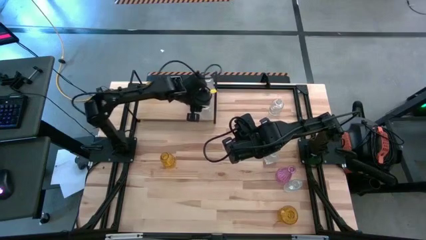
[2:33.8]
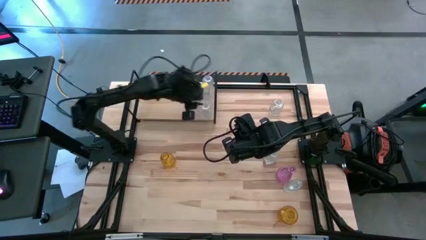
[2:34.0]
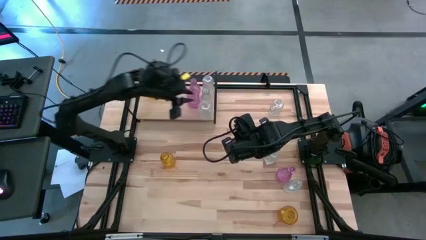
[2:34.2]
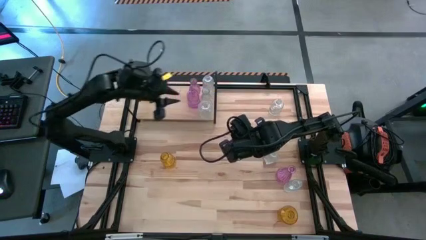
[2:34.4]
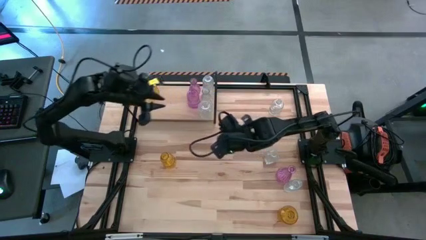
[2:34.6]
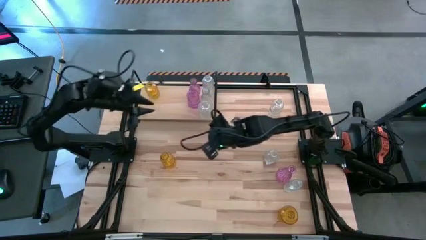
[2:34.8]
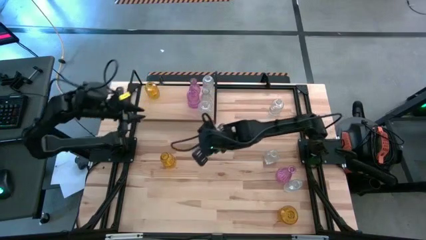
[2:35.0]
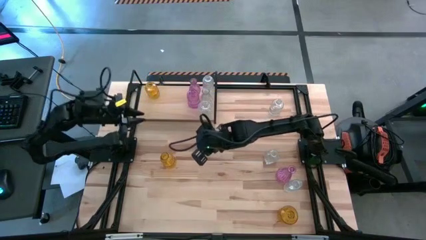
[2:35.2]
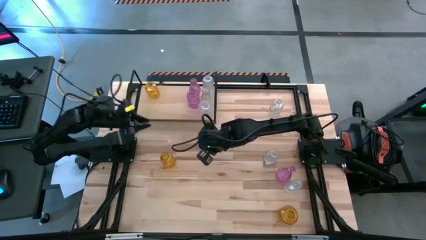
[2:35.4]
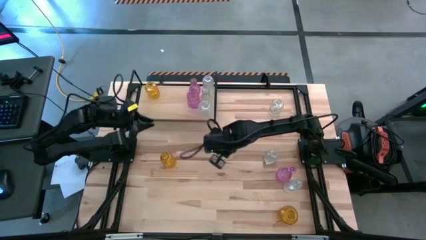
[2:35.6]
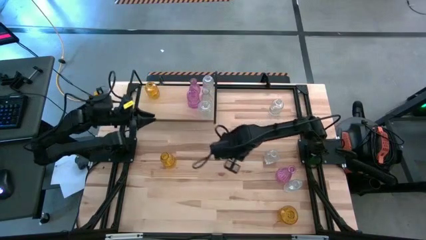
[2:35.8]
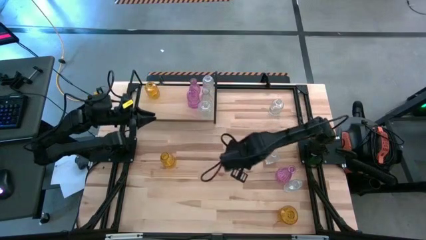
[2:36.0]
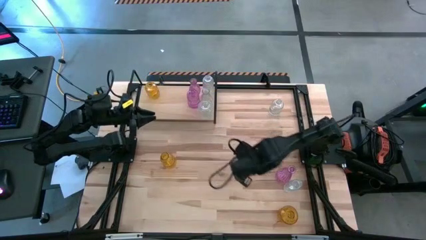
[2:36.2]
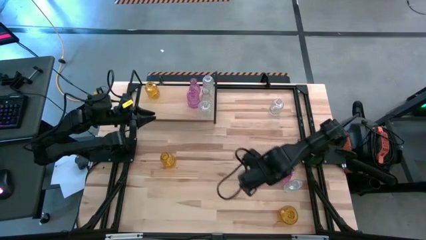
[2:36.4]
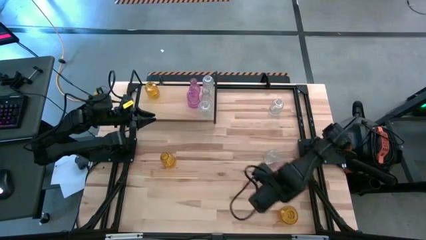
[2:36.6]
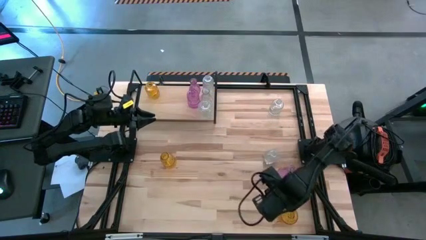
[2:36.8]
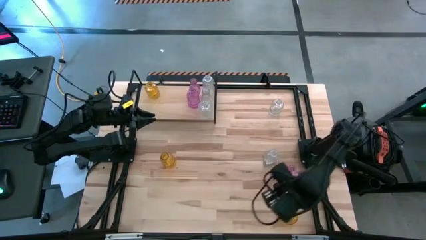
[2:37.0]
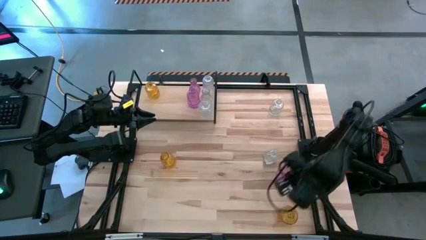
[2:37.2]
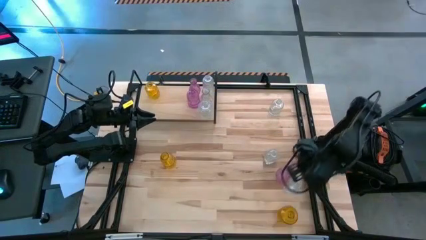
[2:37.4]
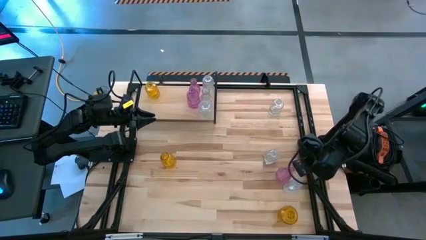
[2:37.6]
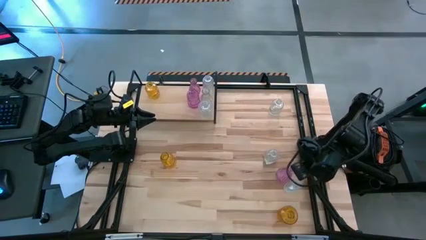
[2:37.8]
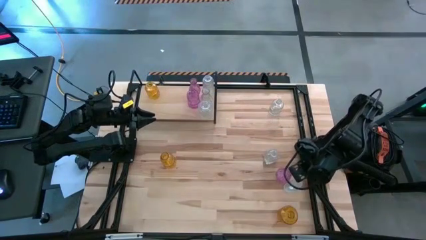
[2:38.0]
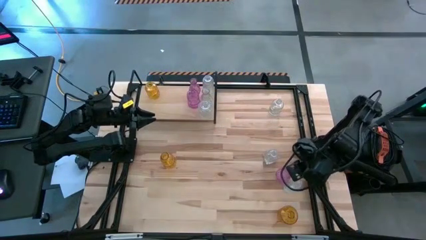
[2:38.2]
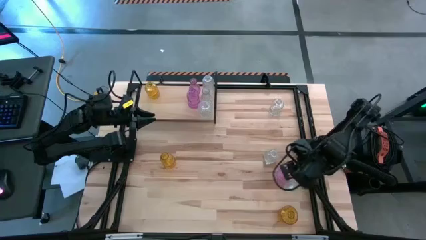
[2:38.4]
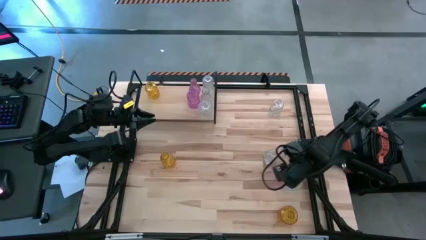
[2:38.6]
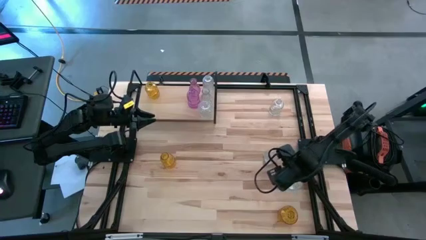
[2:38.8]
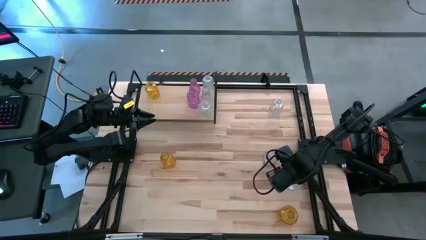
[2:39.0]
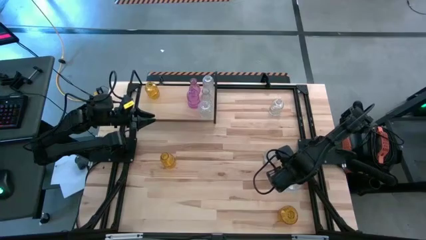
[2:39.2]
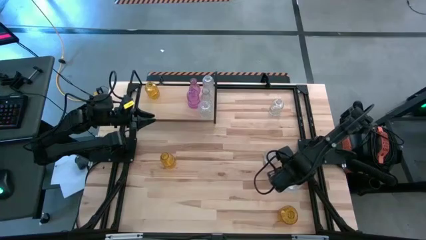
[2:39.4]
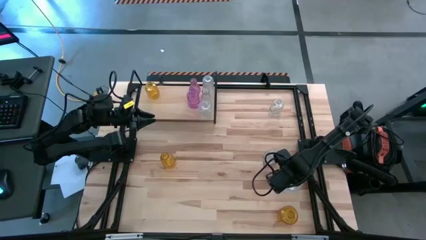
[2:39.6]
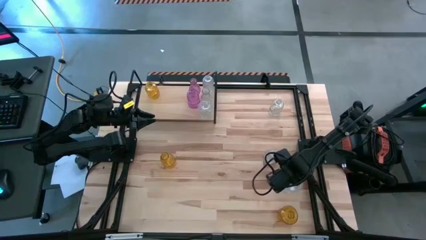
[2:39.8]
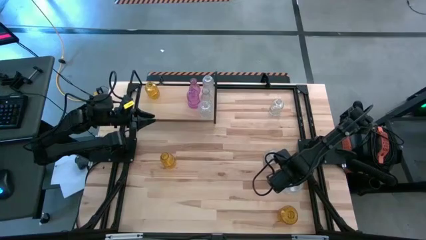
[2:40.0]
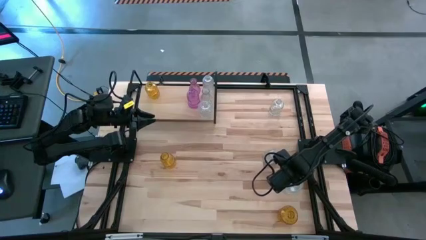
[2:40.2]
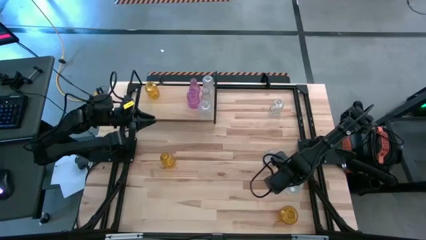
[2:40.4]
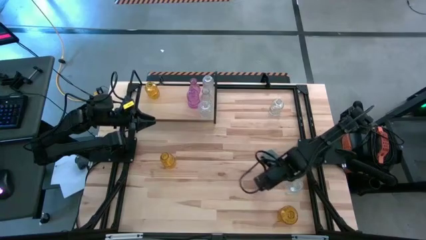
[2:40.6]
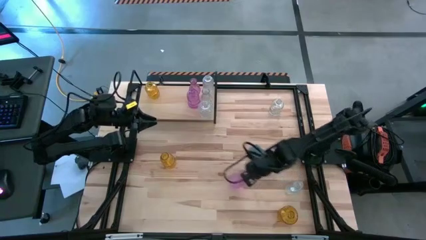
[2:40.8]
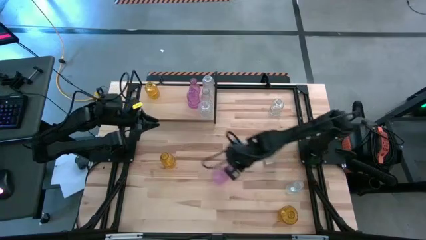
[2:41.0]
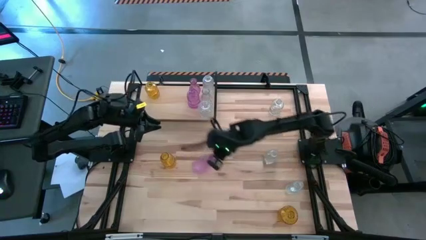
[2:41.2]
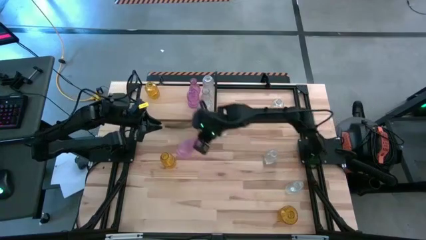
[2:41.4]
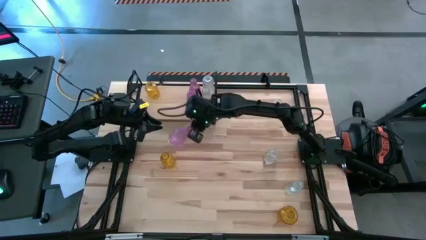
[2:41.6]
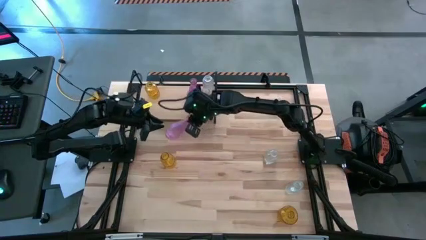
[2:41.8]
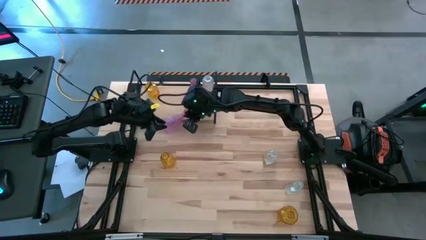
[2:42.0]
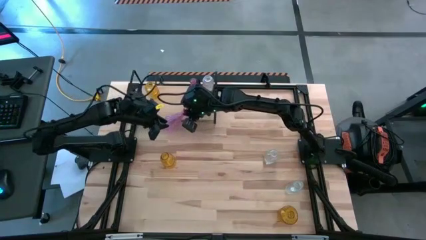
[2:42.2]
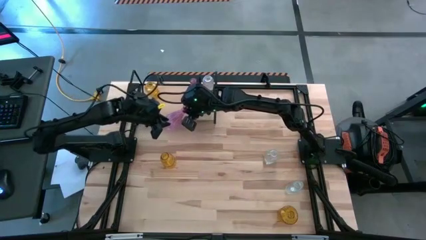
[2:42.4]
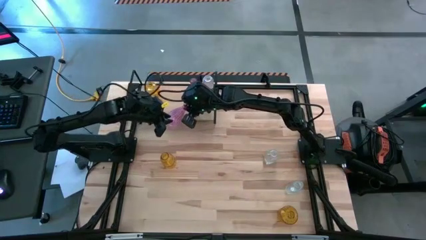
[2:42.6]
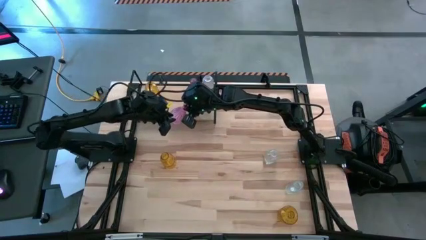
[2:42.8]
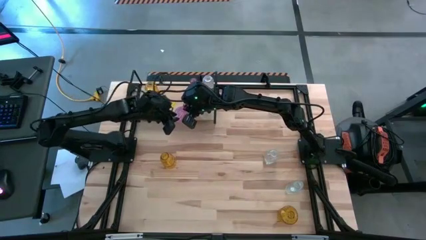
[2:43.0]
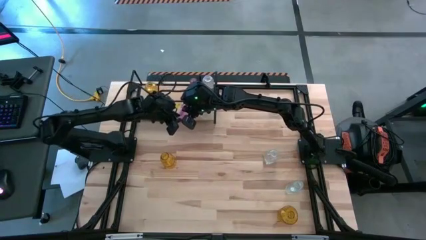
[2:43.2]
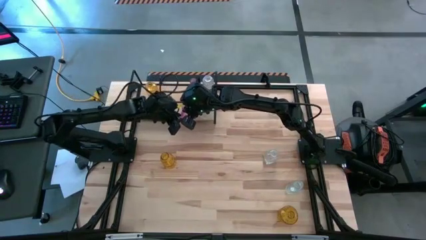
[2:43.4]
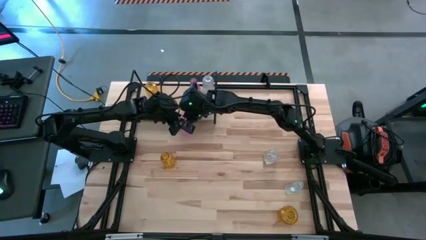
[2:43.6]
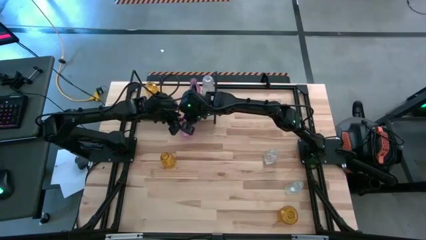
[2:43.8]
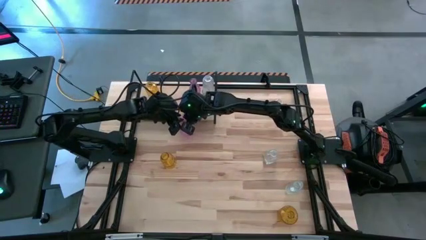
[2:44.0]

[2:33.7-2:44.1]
Task: sort vases onto shelf
Put the pink vase on the shelf aligned with the other pink vases

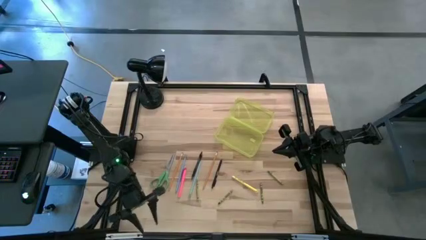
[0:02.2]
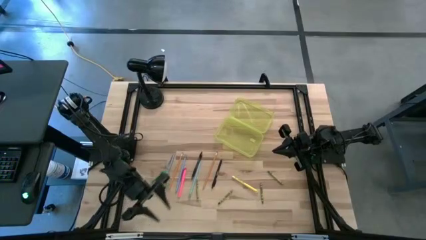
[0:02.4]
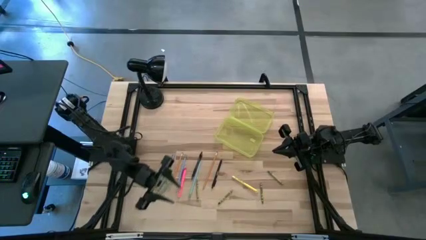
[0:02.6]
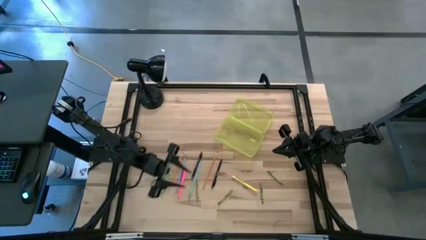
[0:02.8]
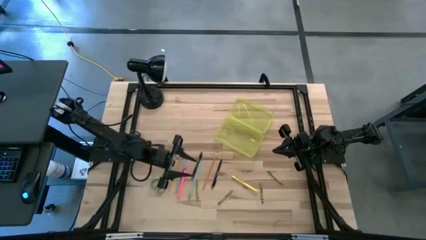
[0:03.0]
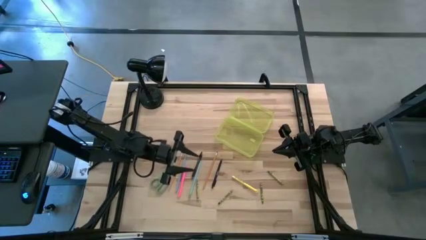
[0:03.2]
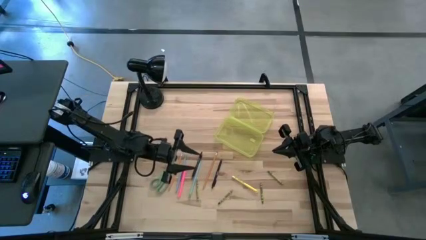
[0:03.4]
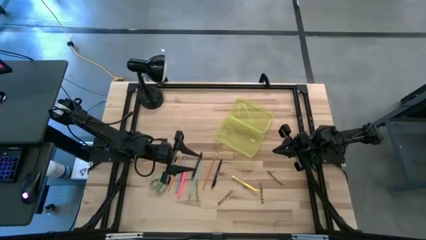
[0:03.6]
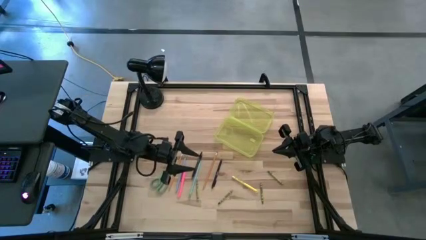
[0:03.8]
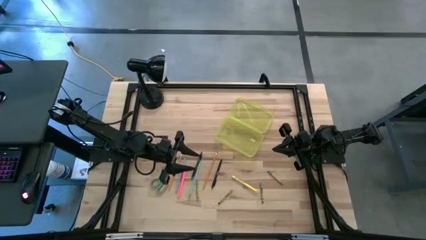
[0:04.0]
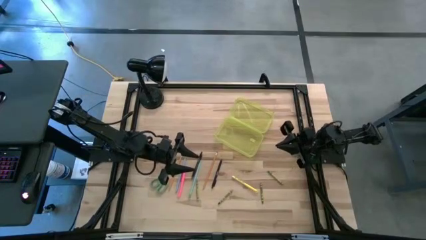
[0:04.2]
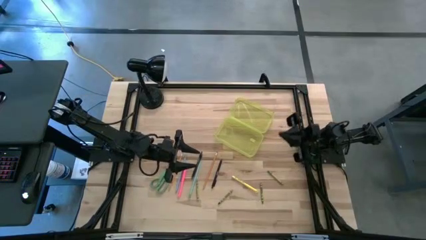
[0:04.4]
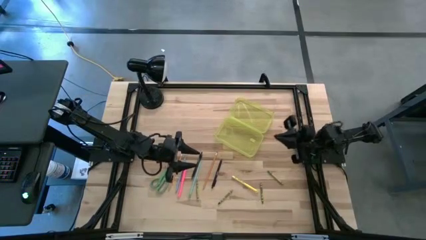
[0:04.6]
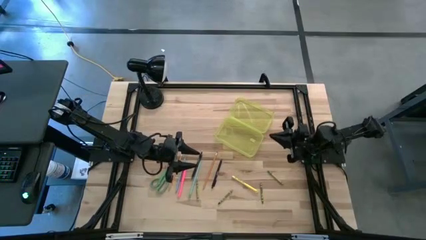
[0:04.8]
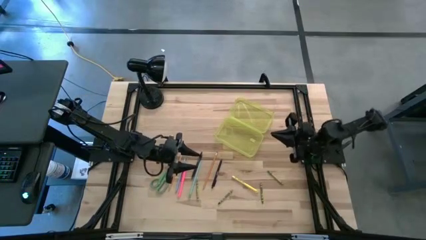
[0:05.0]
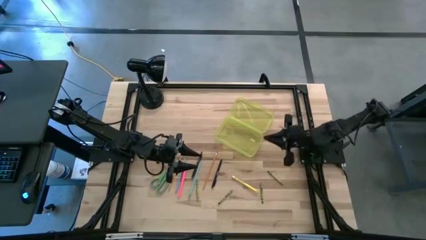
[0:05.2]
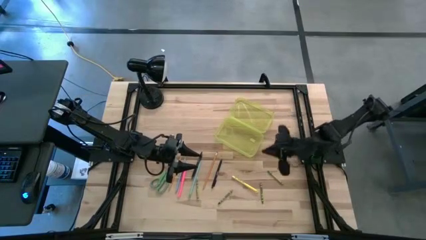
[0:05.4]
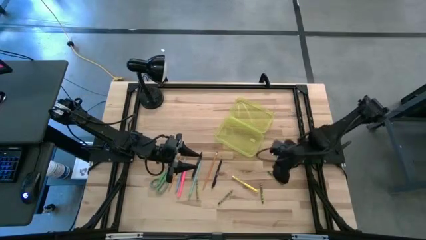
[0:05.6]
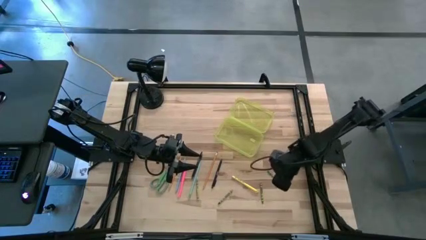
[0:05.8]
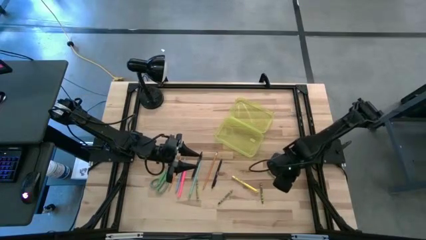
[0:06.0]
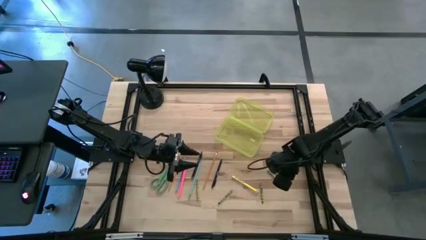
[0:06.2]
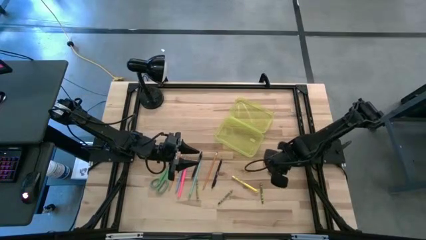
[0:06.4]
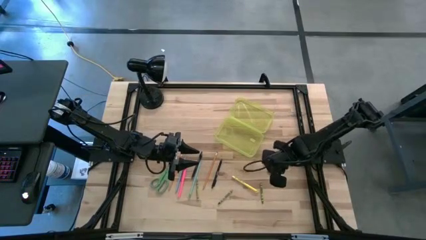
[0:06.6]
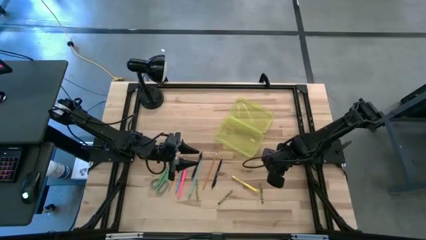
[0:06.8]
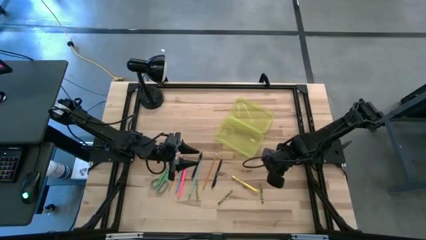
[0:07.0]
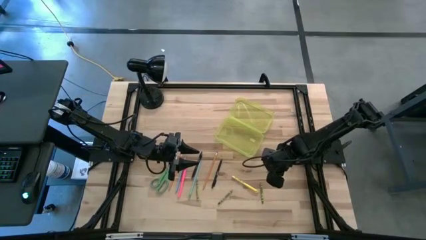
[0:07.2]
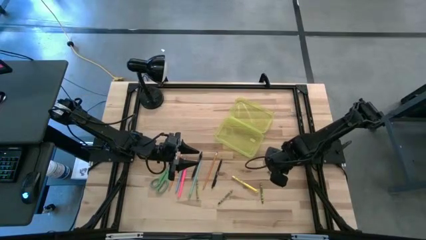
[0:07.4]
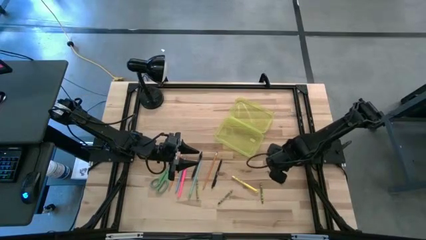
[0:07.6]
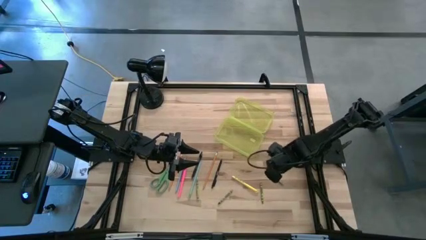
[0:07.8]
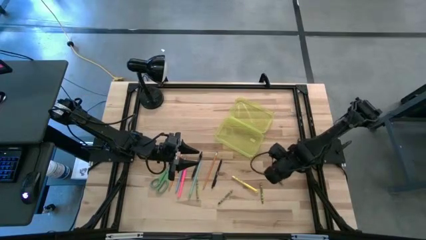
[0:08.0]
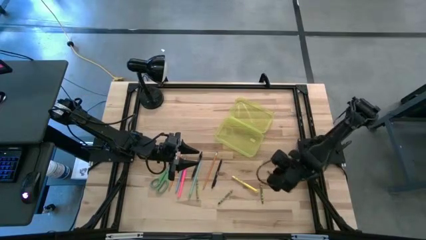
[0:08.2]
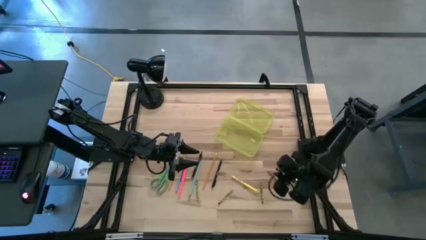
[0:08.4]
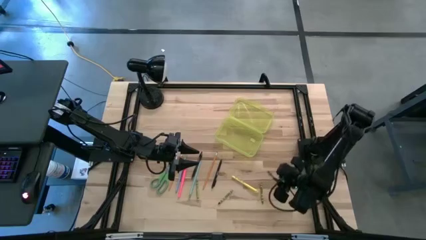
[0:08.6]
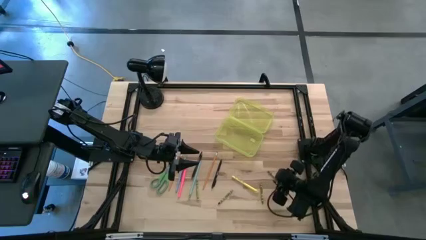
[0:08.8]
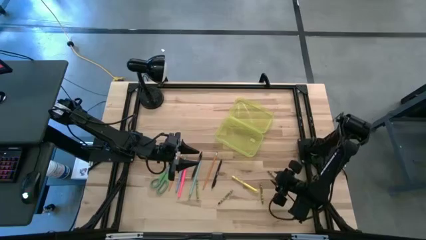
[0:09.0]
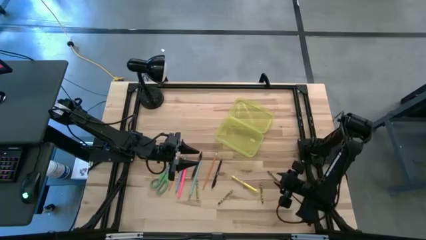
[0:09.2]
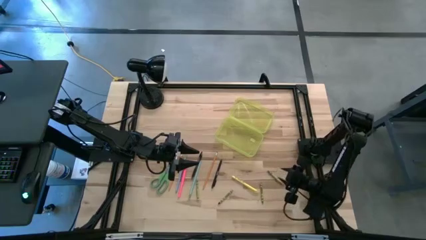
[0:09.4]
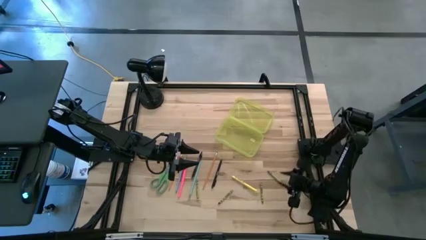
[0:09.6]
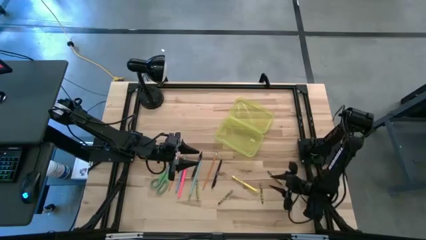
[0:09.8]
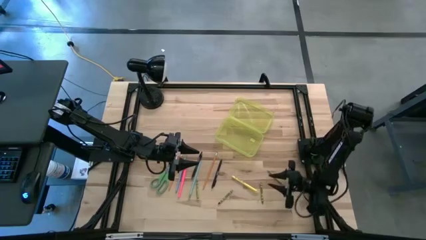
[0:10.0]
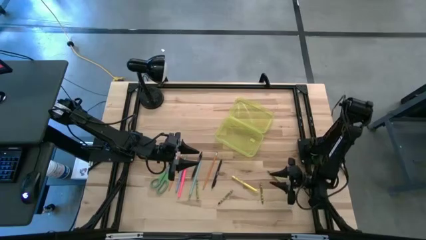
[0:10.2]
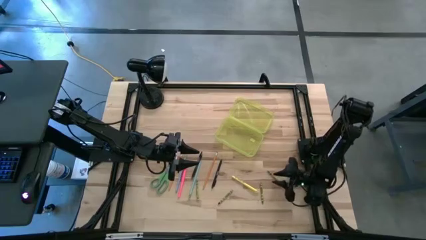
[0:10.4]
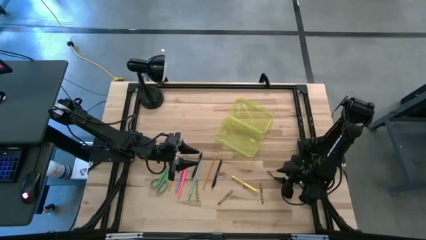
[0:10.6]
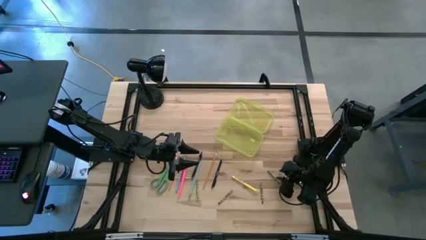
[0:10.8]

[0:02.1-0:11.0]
Task: Pick & place school supplies into a supply box
Put the light green crayon into the yellow supply box
